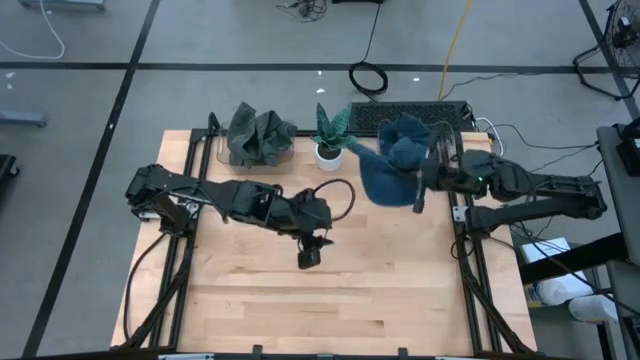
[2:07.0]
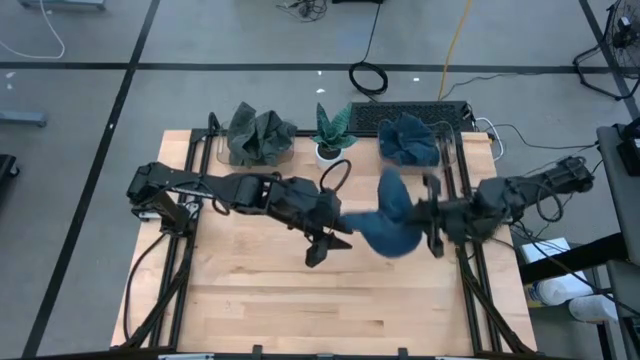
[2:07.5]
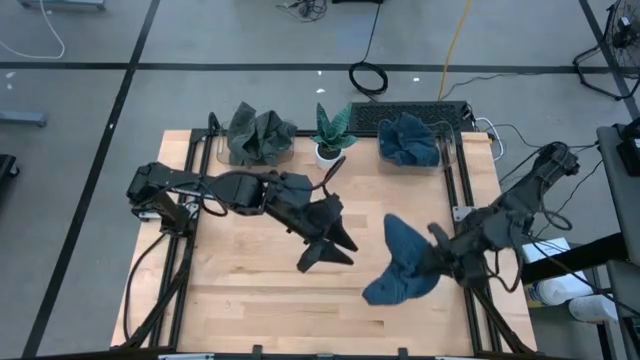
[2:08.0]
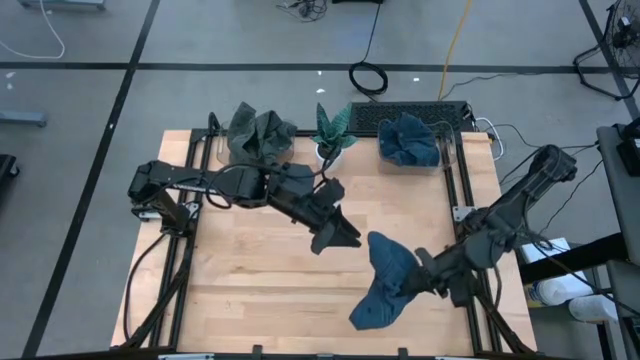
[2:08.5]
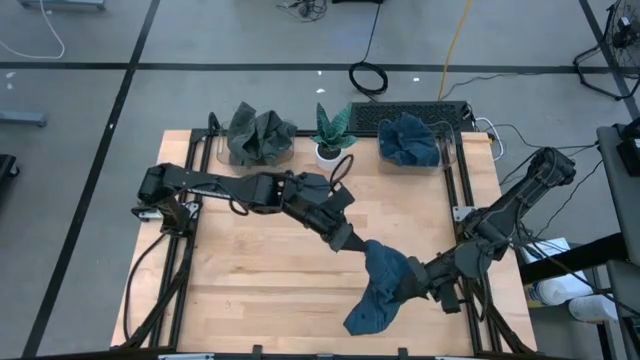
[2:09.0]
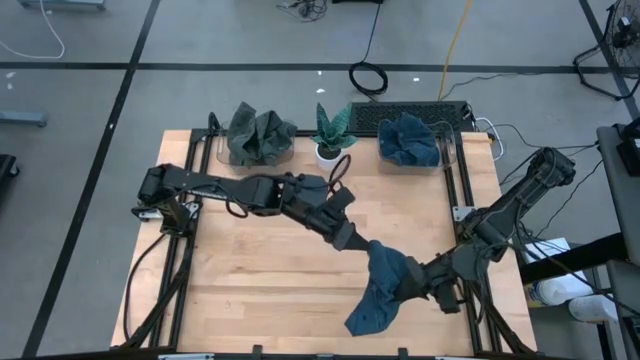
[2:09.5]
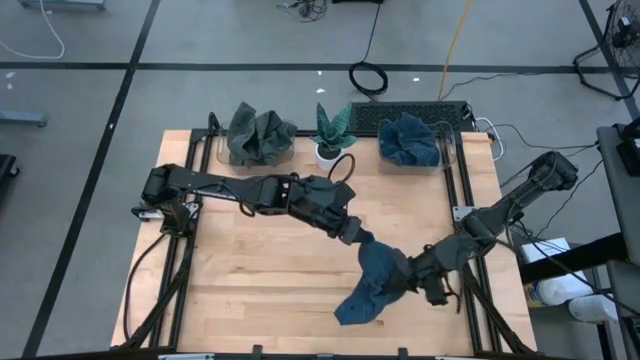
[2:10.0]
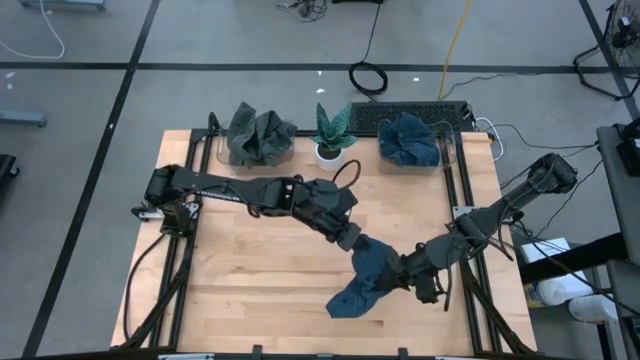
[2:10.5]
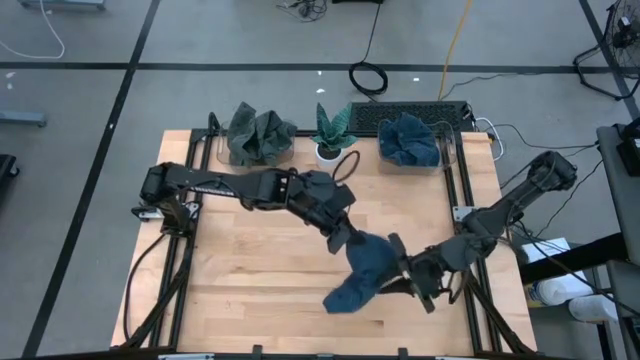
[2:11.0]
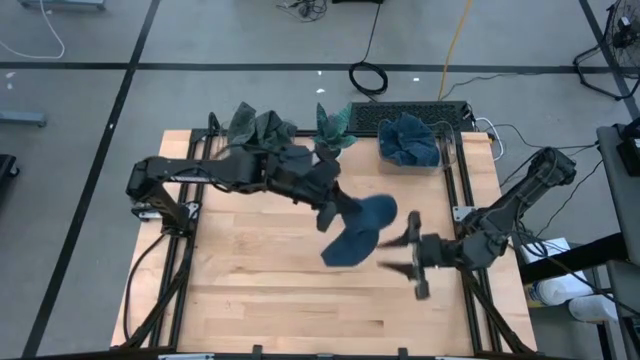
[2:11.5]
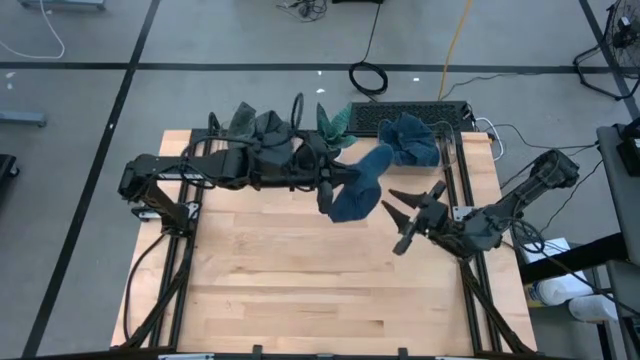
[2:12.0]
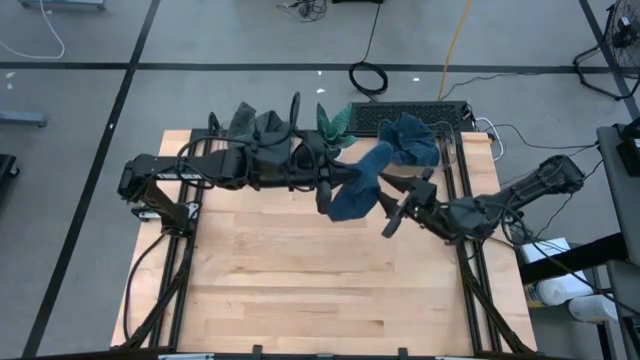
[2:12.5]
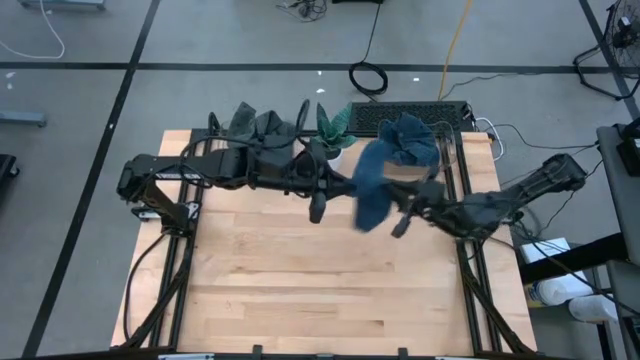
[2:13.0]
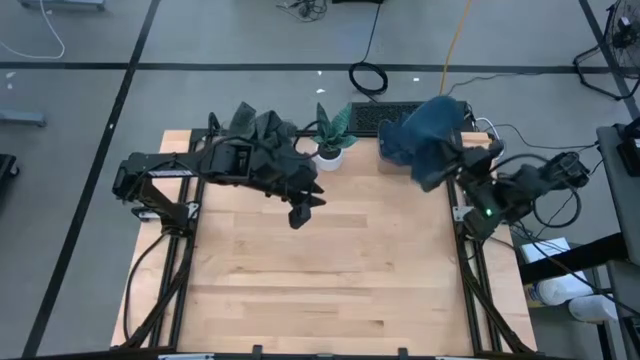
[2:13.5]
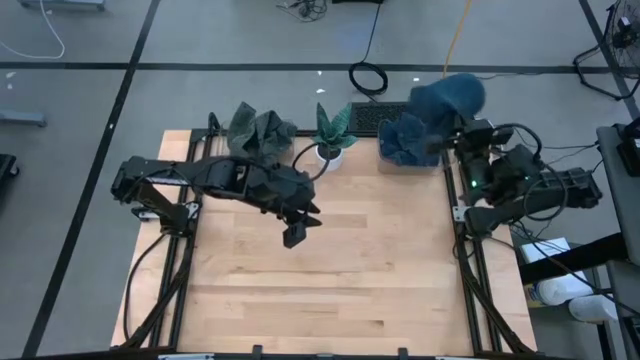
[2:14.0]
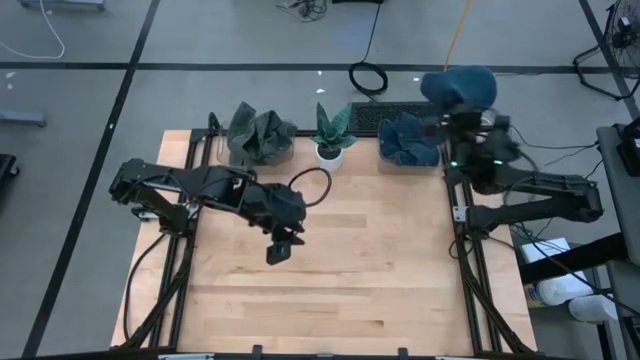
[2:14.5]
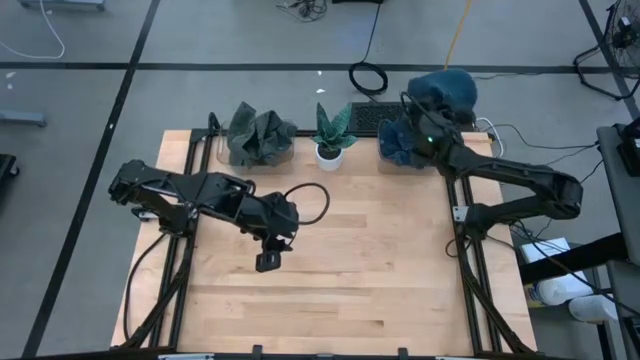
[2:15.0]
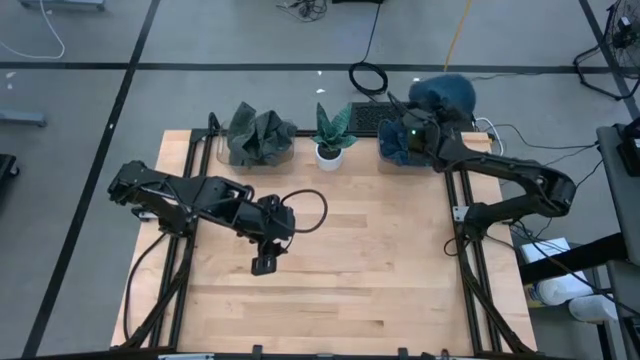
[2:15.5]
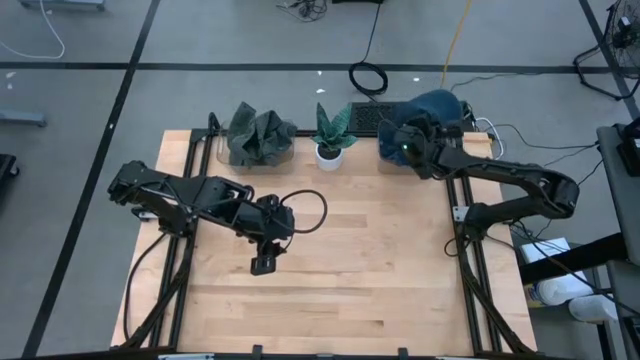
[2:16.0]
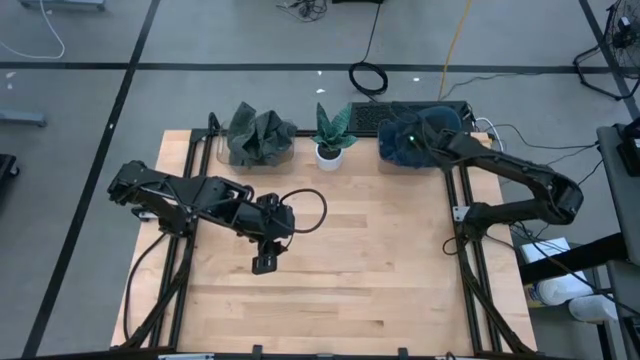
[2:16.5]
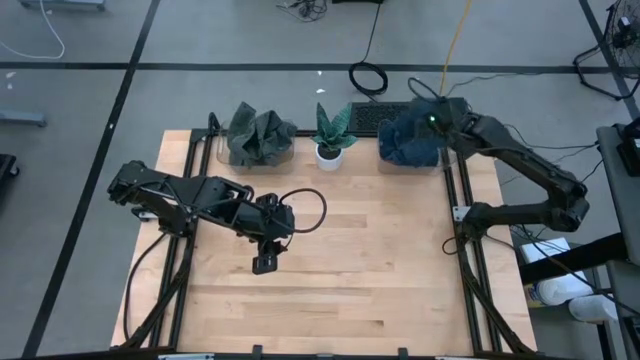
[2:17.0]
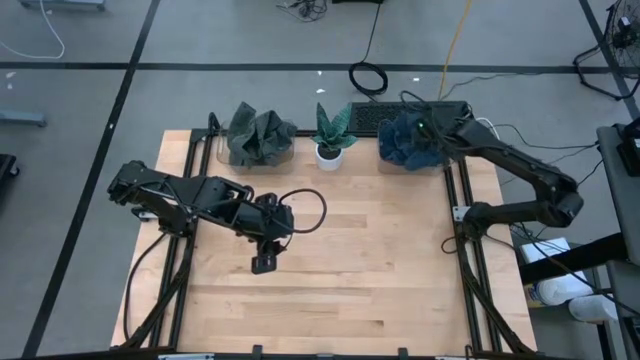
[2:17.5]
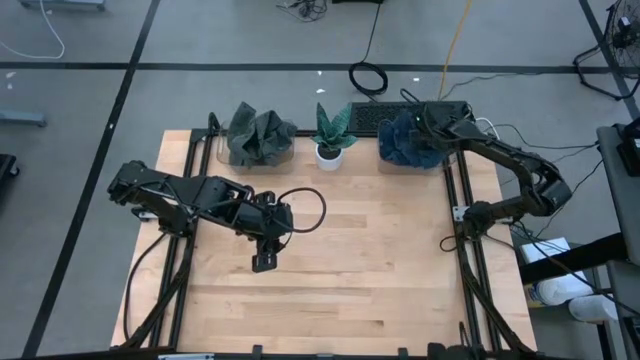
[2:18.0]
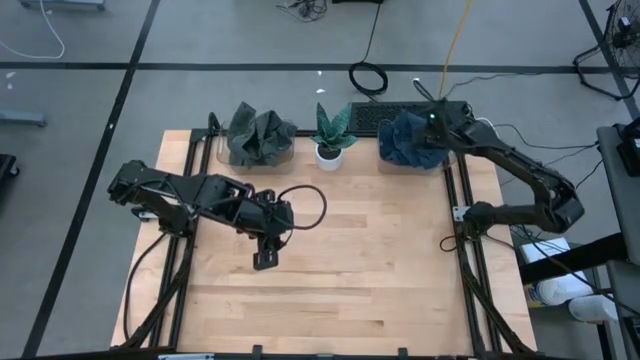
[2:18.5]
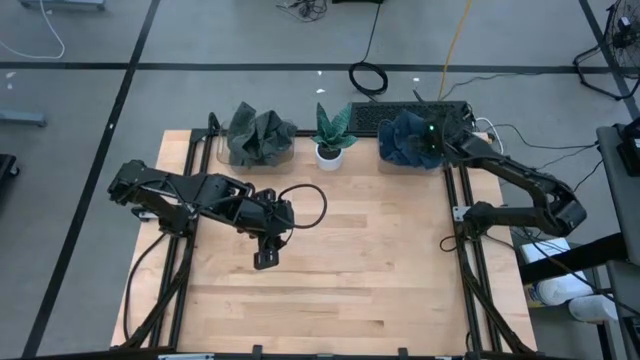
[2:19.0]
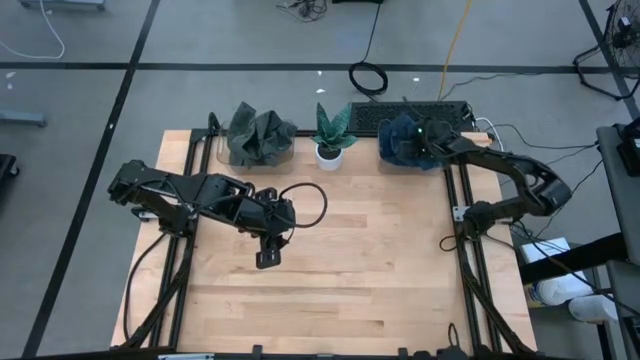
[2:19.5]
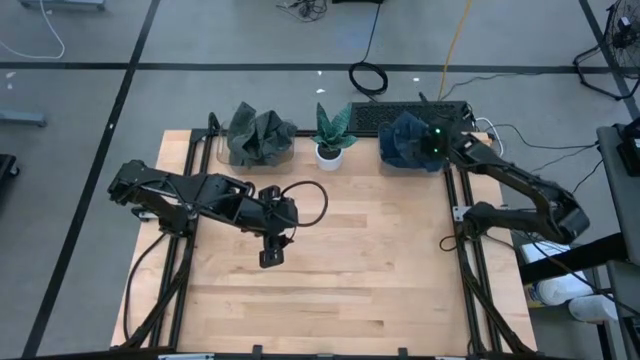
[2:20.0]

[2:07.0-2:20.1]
Task: Pick & Place hat
Put the blue cap into the right transparent bin

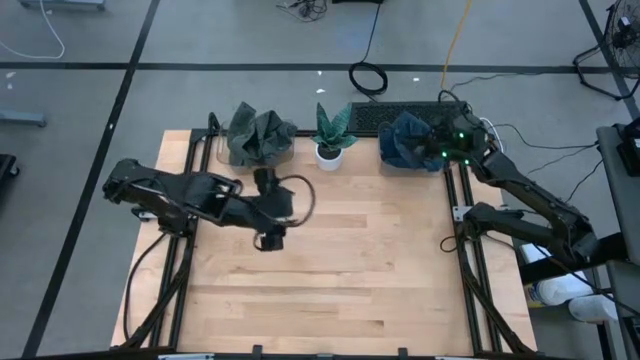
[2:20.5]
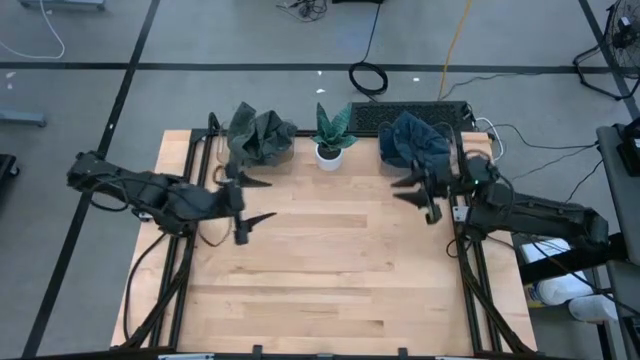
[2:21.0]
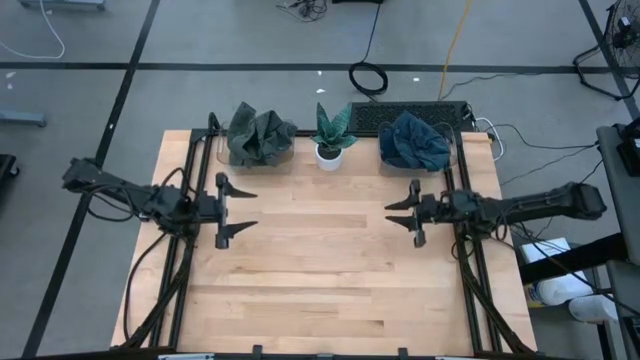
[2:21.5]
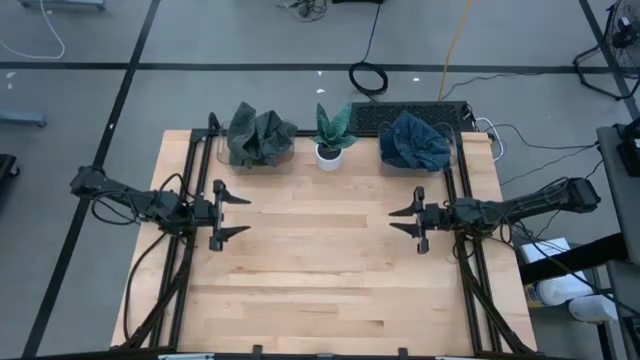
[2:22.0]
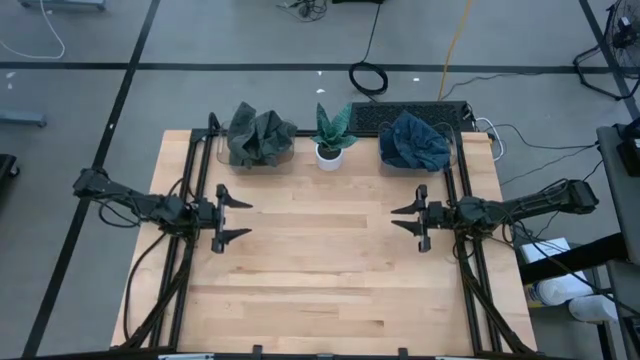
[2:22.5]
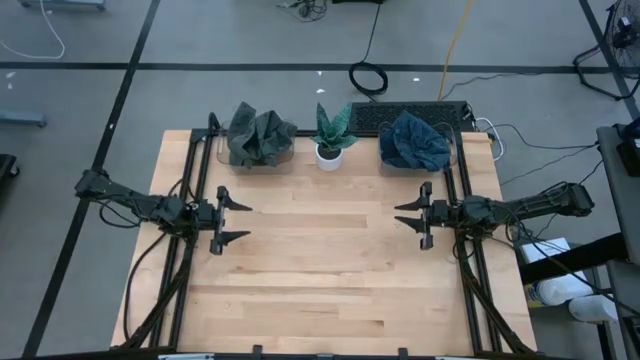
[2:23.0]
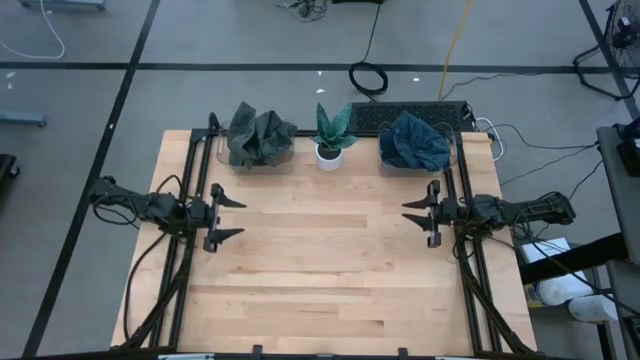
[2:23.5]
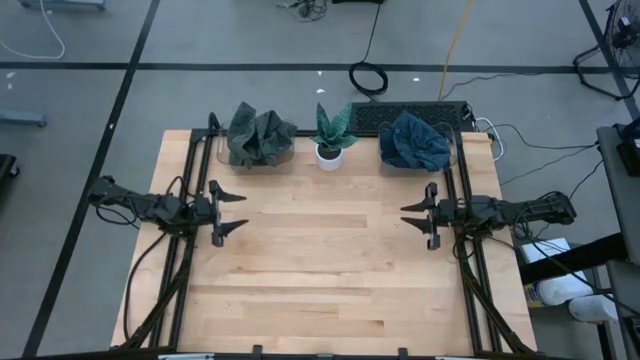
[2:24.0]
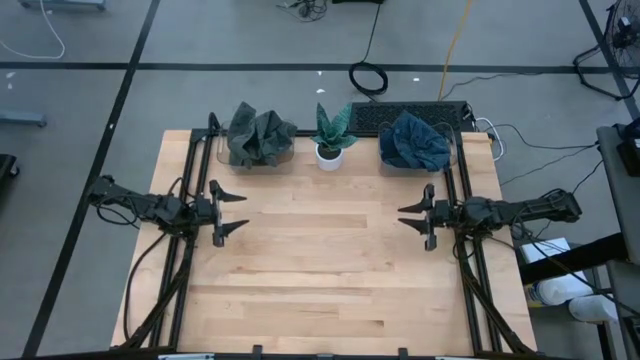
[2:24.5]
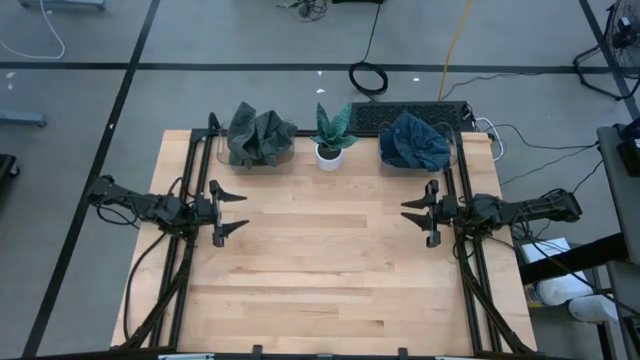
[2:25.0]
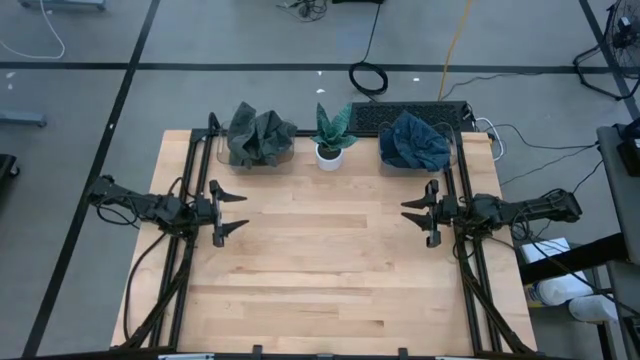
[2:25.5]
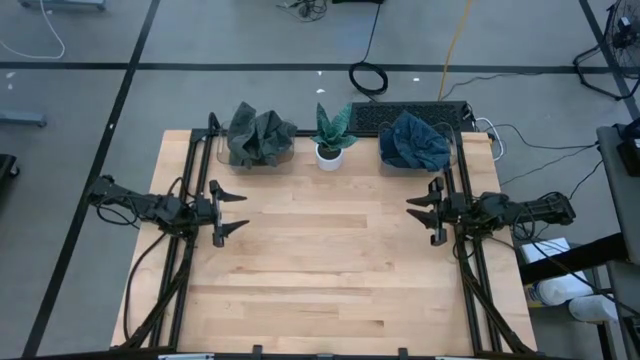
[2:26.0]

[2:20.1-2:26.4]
Return to Home Position
